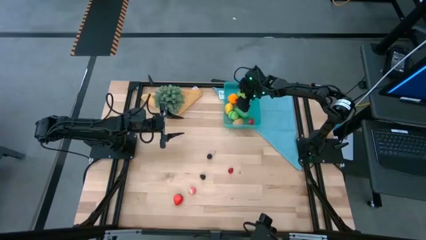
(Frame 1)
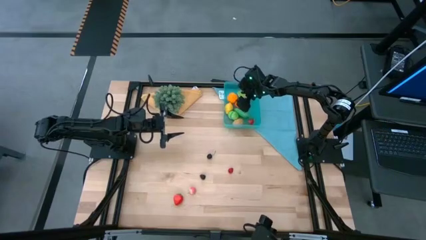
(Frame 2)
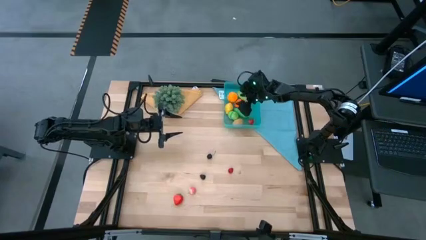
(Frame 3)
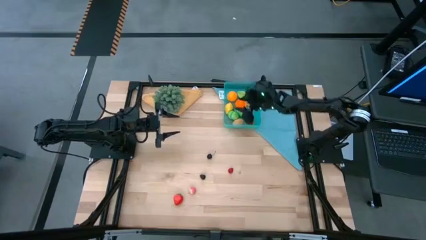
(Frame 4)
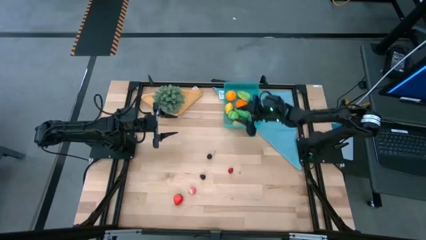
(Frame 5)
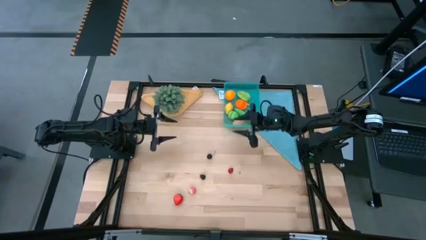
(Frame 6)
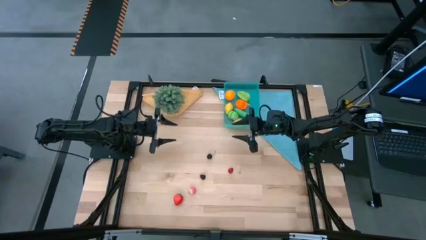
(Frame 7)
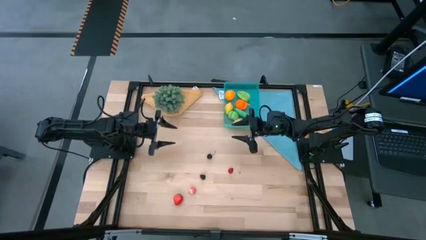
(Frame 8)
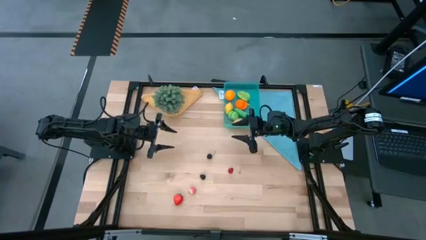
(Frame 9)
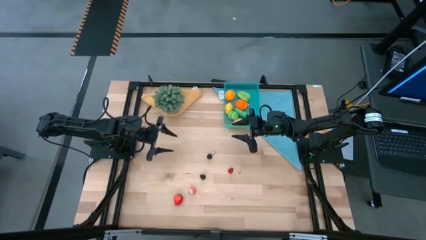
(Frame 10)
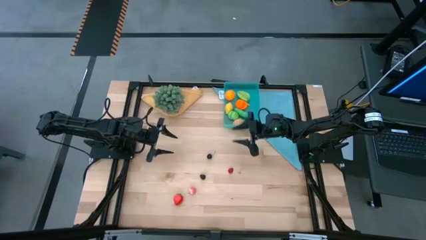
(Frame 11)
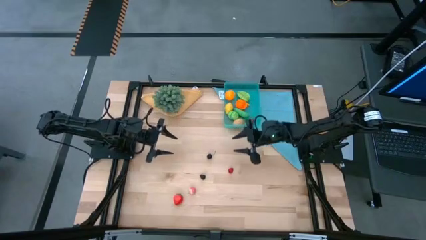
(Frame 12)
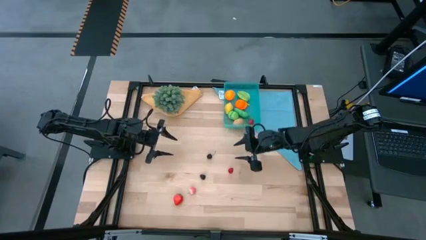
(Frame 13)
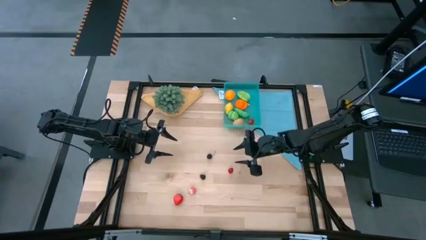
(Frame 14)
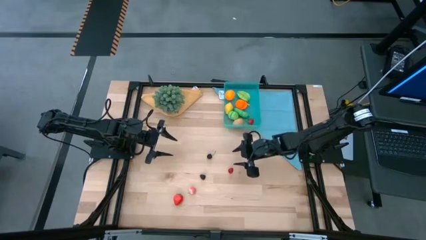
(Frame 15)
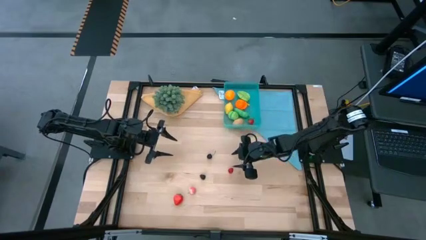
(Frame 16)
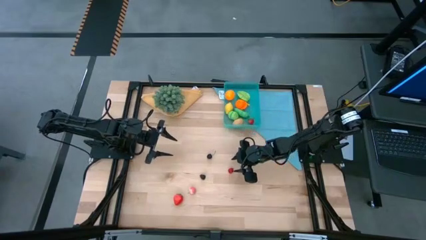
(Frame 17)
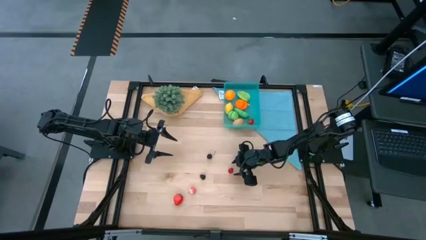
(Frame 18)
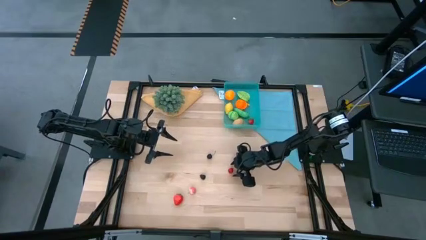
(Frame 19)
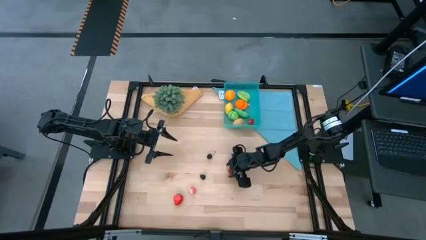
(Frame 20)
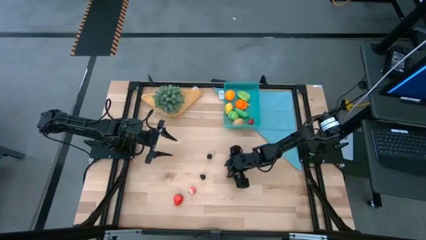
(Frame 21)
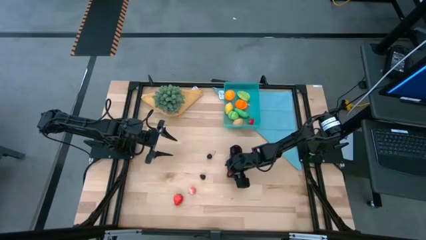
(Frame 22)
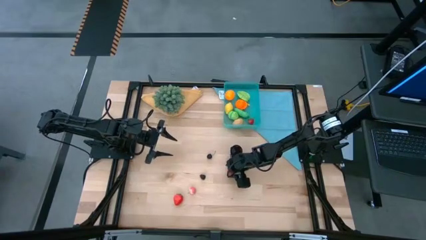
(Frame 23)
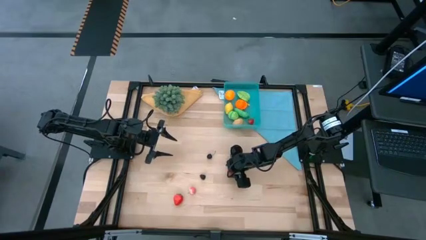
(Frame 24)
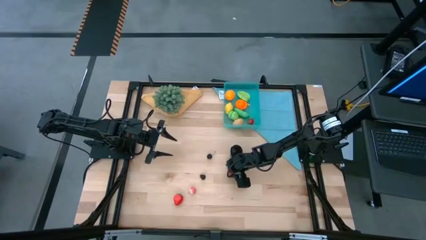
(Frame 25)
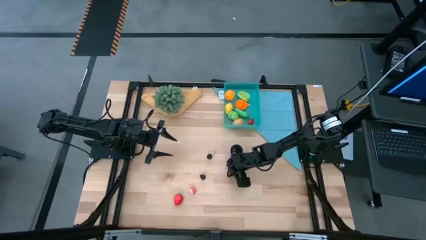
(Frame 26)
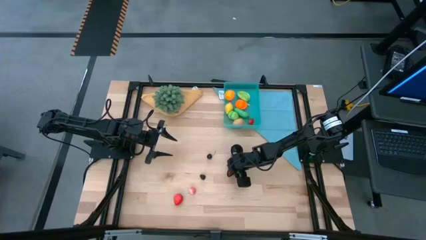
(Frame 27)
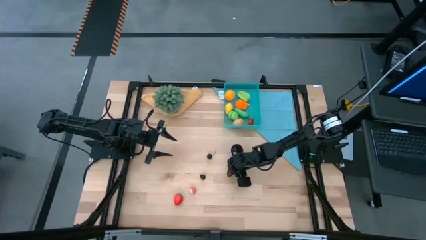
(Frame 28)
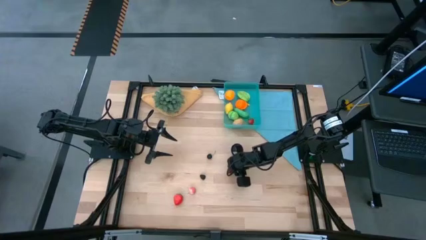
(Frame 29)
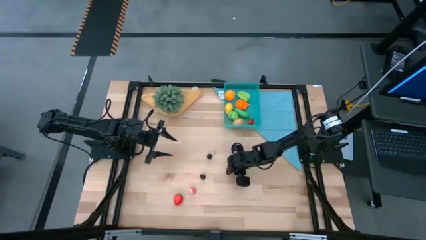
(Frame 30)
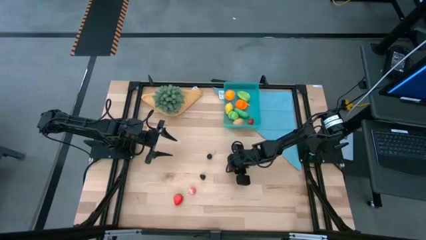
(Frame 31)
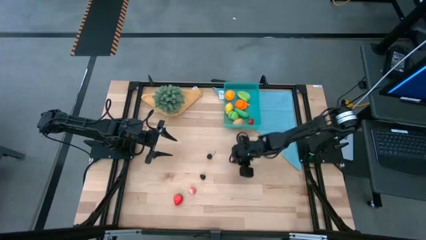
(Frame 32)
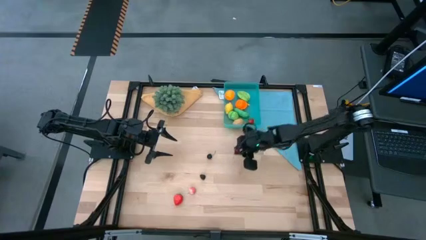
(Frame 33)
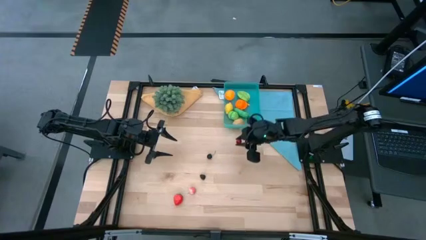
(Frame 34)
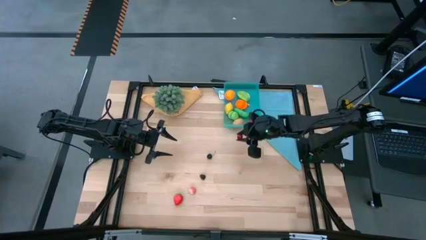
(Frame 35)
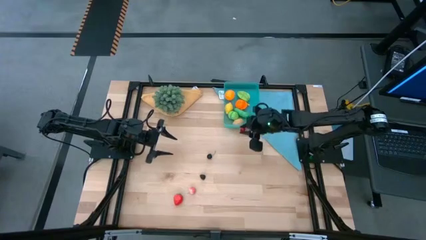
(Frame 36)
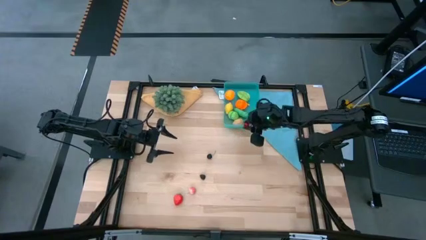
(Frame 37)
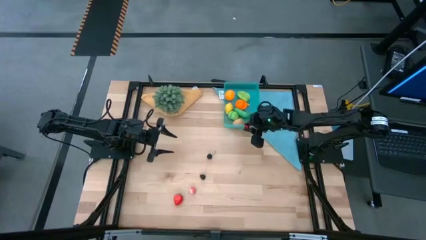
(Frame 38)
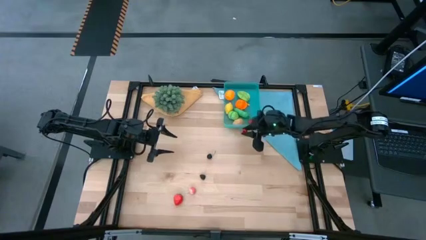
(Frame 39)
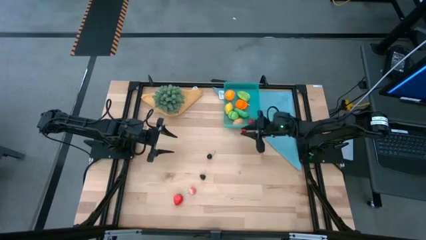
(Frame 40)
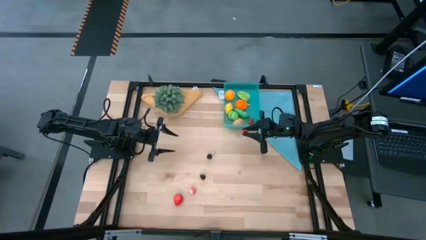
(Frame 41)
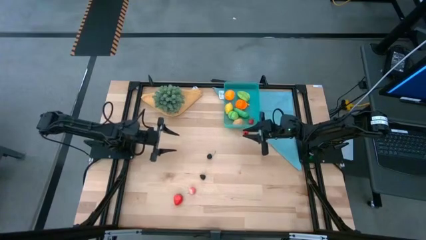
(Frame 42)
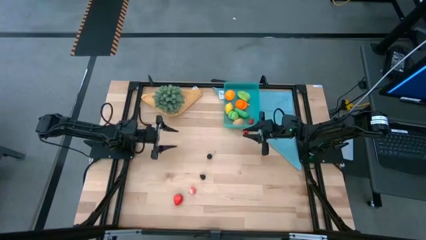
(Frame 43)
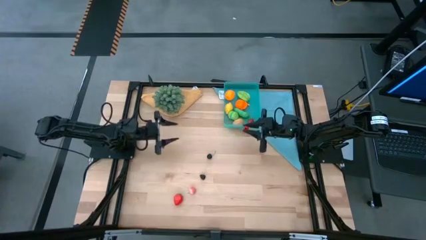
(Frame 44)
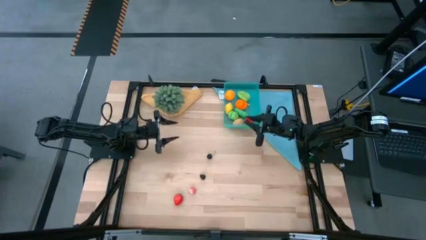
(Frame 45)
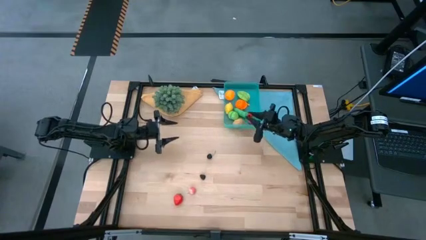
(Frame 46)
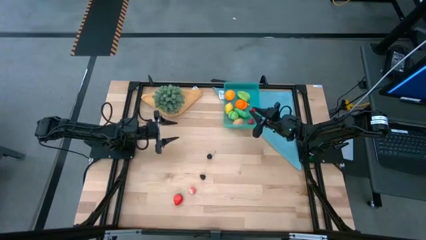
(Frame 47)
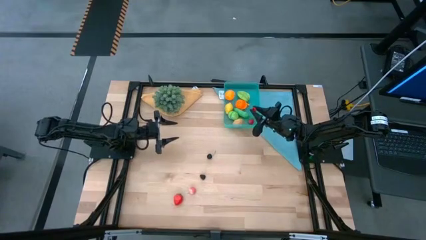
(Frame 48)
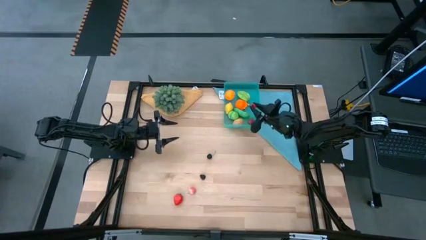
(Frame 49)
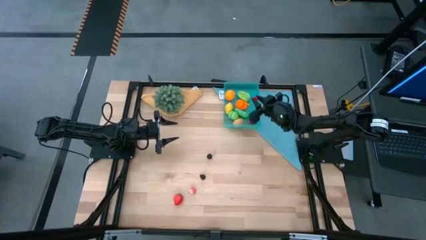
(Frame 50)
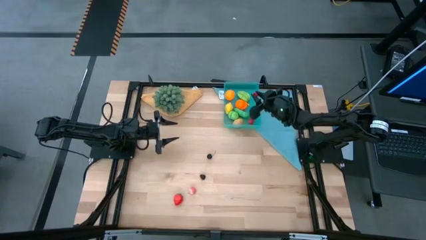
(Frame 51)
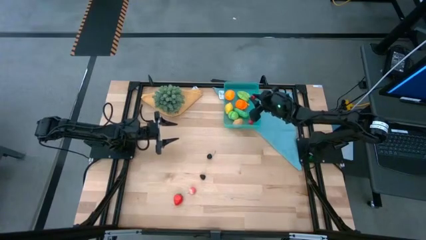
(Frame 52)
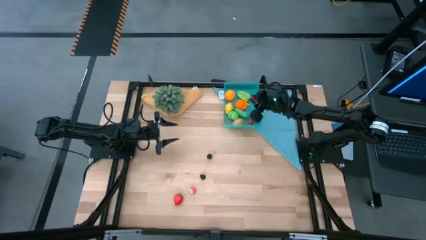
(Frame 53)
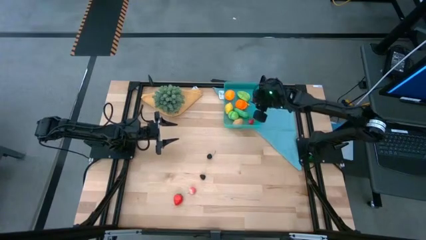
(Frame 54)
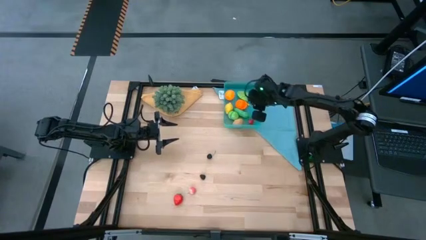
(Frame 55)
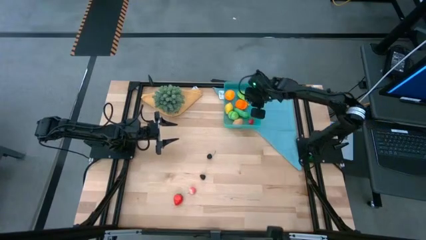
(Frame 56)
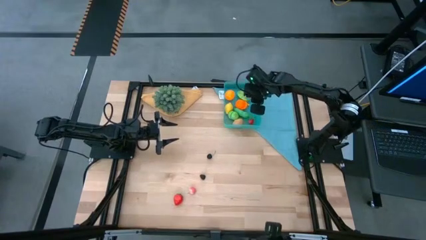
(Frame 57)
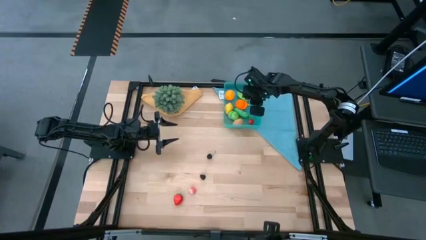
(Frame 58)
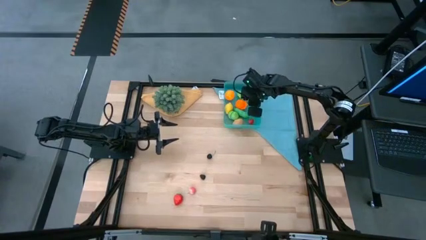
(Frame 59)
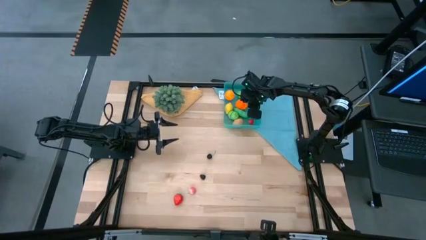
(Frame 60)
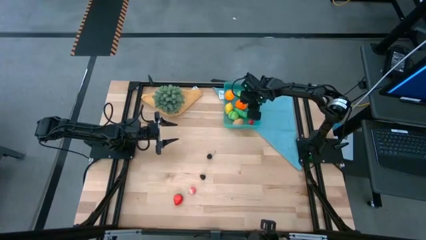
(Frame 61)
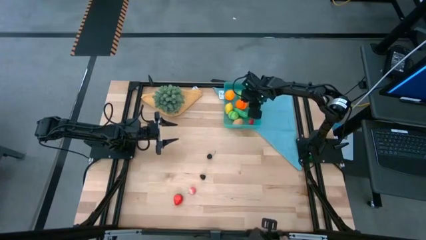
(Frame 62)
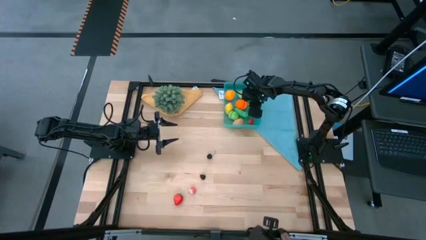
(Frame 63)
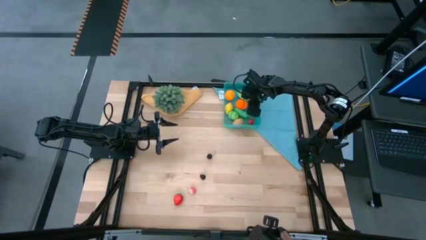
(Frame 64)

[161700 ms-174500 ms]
Task: Pick and placing Produce into tupperware
Put the red raspberry into the blue bin

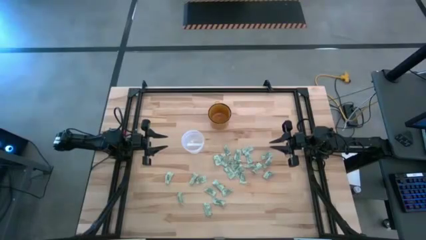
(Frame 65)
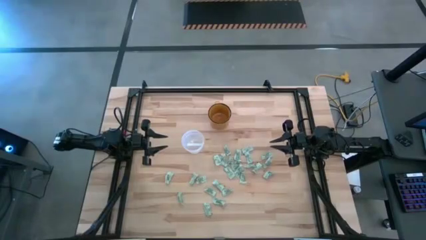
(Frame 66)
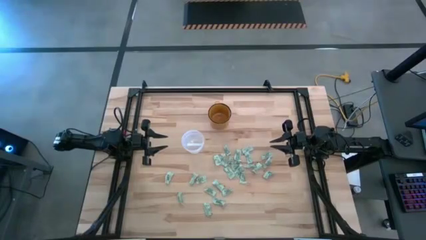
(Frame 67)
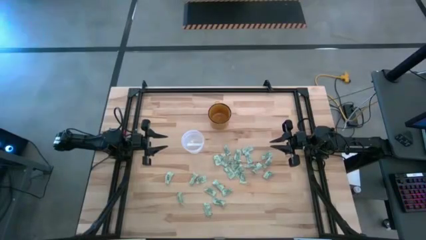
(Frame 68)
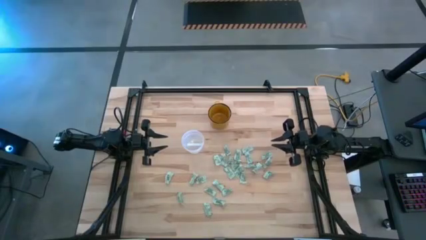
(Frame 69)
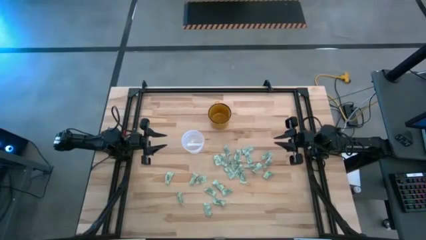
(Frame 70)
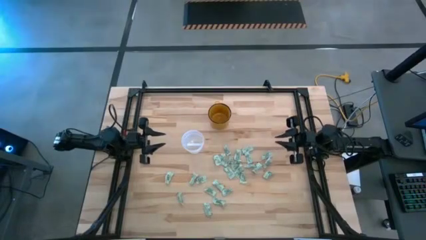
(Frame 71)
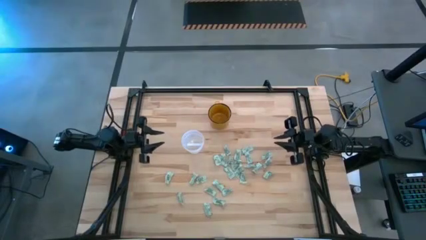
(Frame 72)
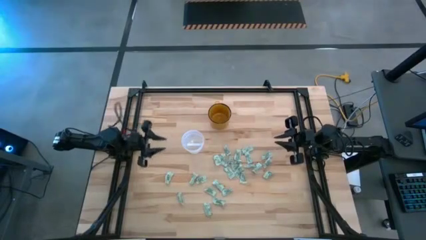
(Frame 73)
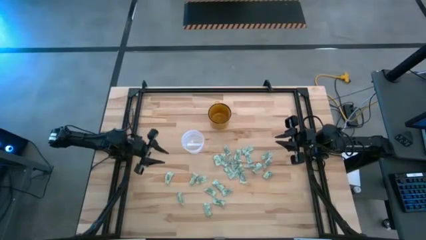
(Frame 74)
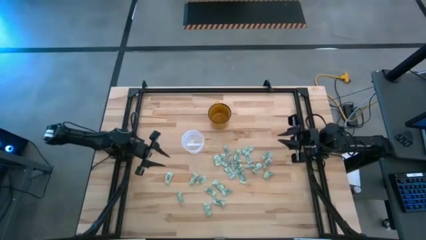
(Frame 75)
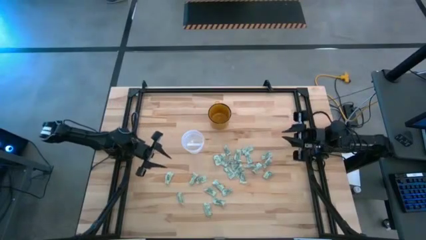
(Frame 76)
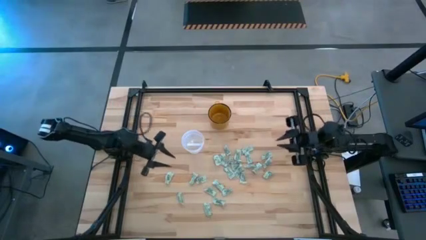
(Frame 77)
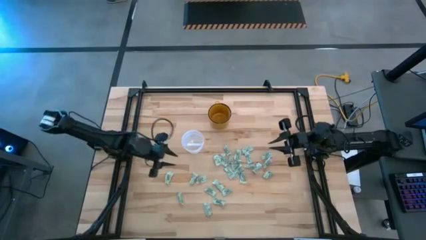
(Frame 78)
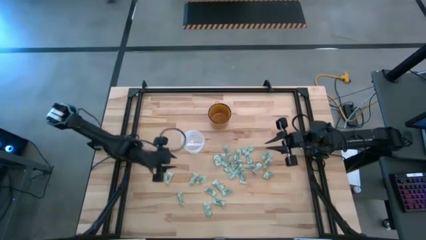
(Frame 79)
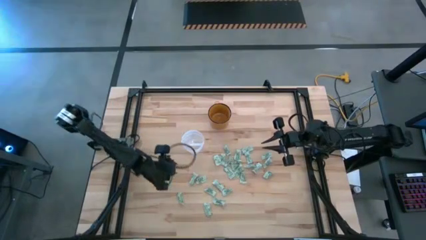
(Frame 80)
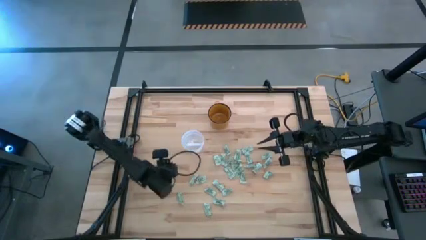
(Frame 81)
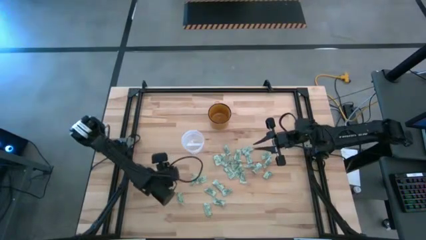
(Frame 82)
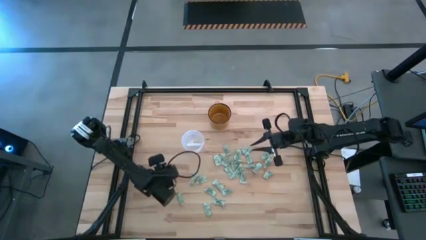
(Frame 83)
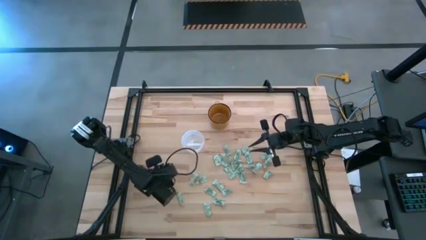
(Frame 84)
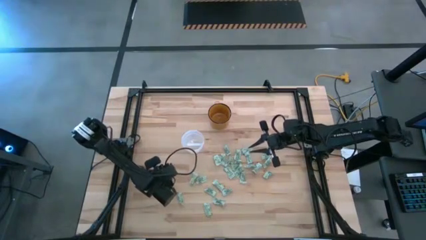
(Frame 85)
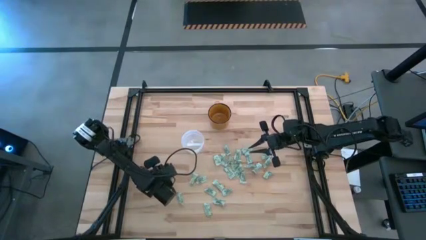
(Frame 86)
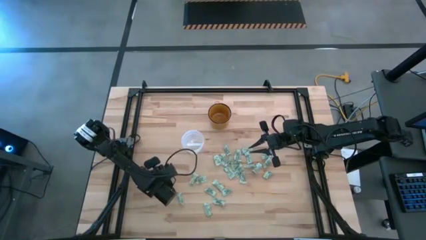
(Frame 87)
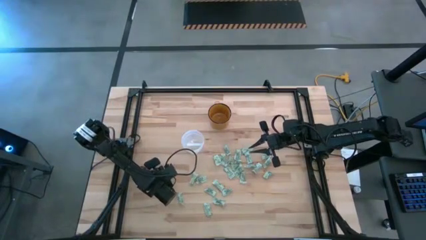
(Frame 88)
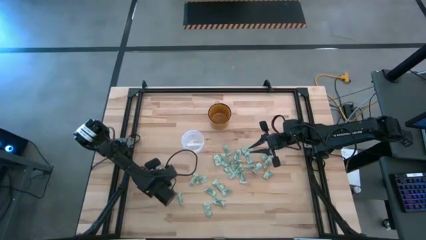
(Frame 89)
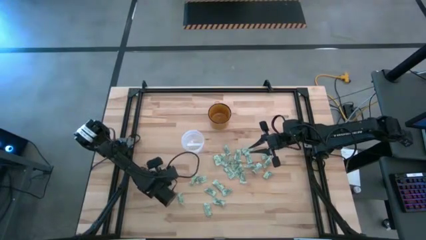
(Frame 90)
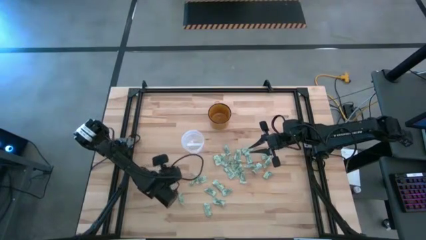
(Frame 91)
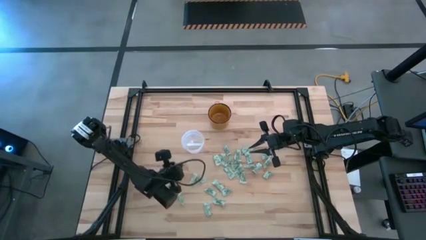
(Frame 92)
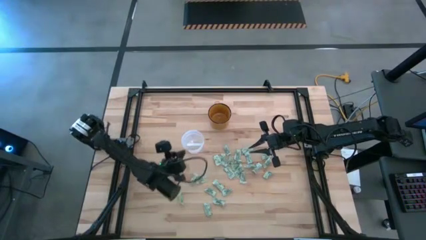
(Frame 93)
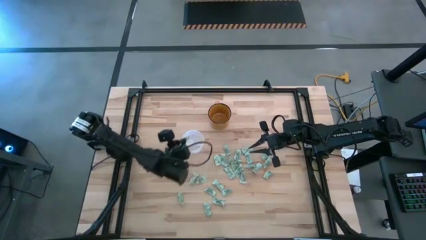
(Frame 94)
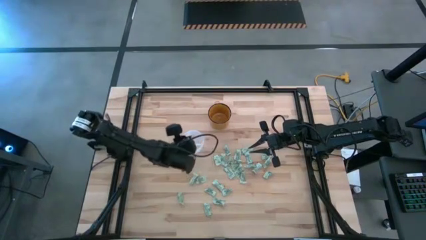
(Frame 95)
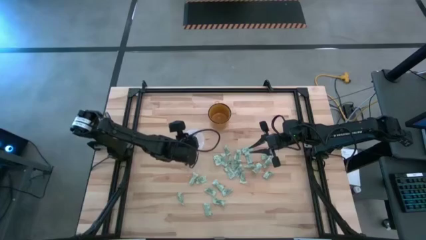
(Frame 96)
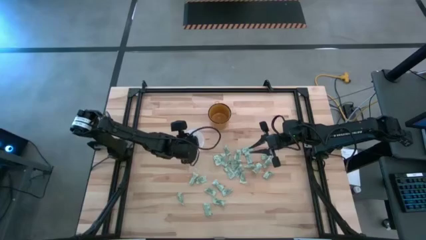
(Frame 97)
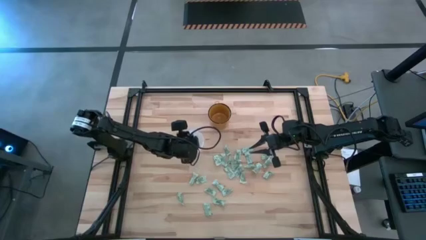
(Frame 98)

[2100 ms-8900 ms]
Task: Pick and place Stevia / Truvia into bins
Put the stevia packet into the transparent bin
